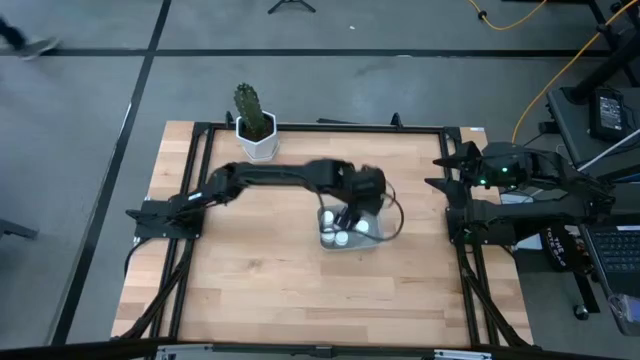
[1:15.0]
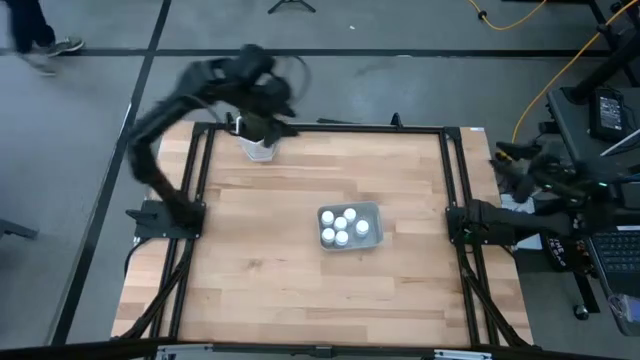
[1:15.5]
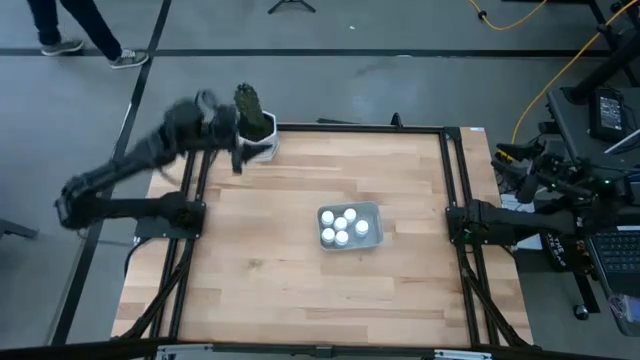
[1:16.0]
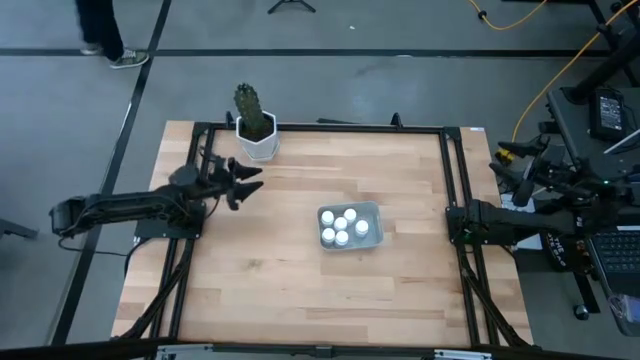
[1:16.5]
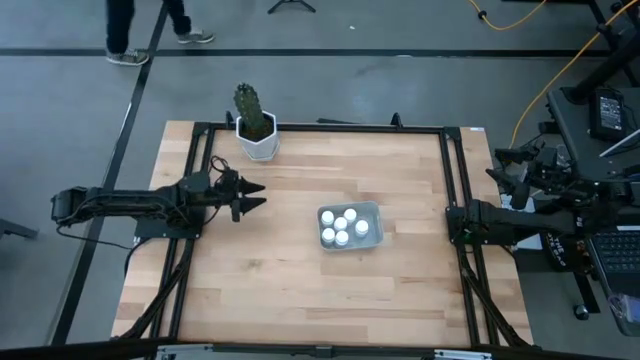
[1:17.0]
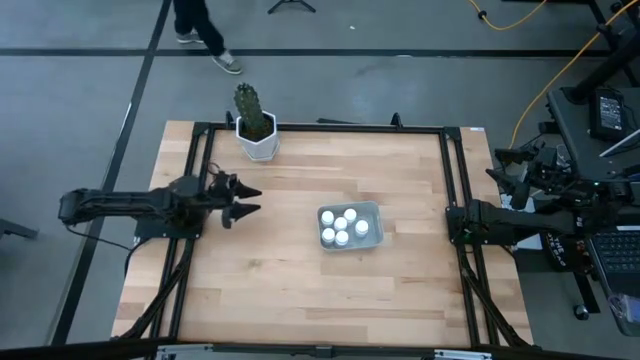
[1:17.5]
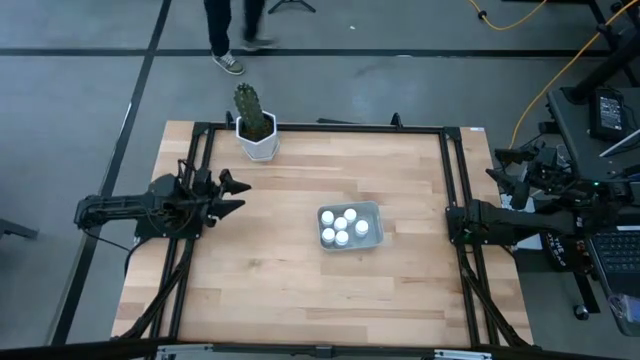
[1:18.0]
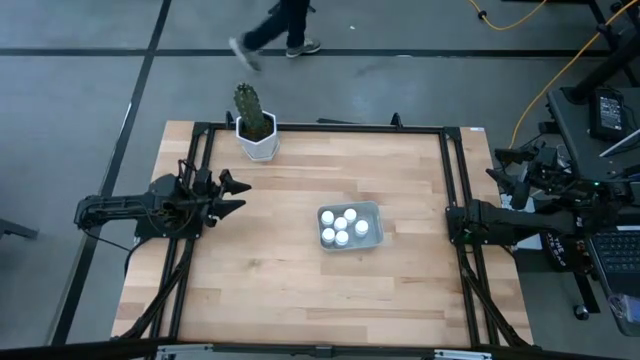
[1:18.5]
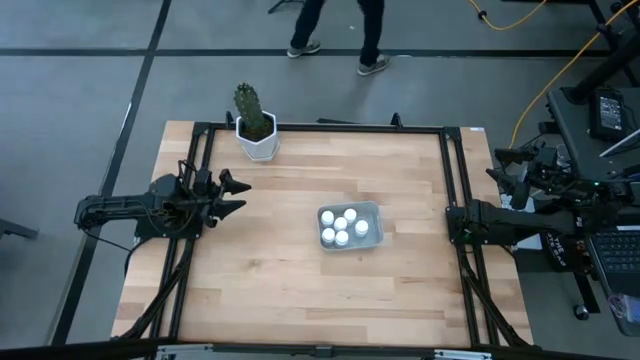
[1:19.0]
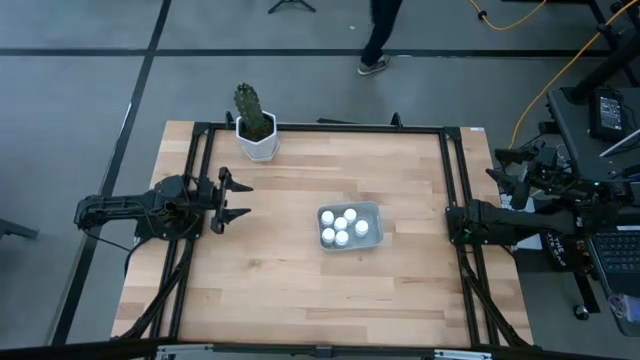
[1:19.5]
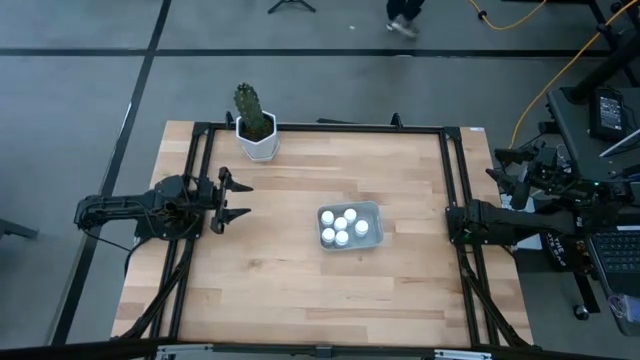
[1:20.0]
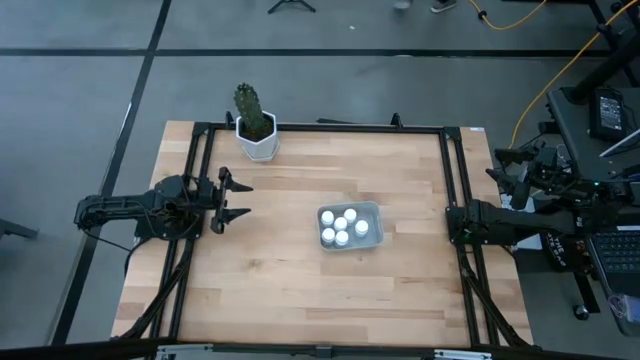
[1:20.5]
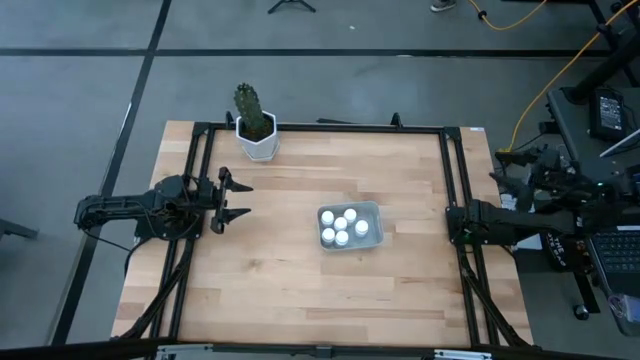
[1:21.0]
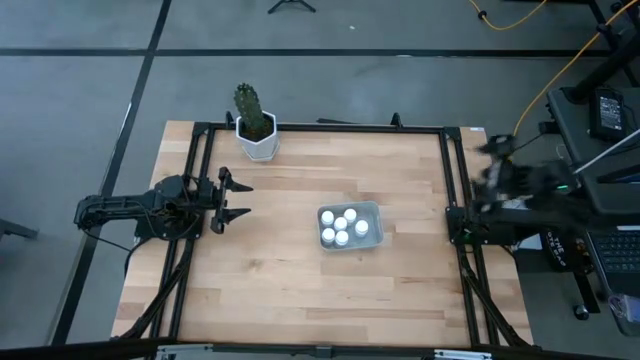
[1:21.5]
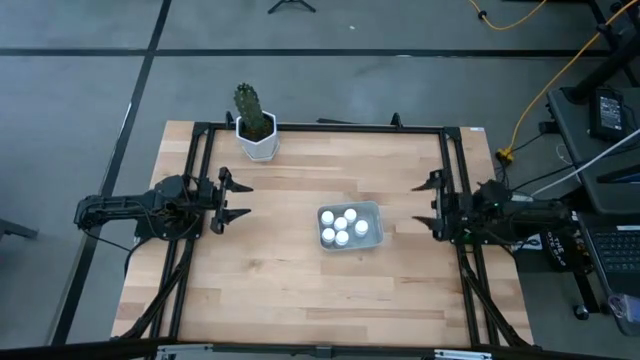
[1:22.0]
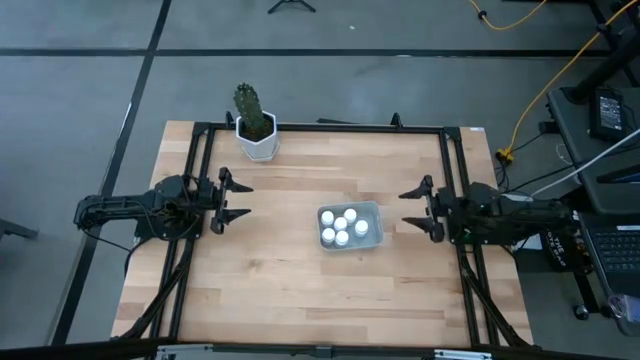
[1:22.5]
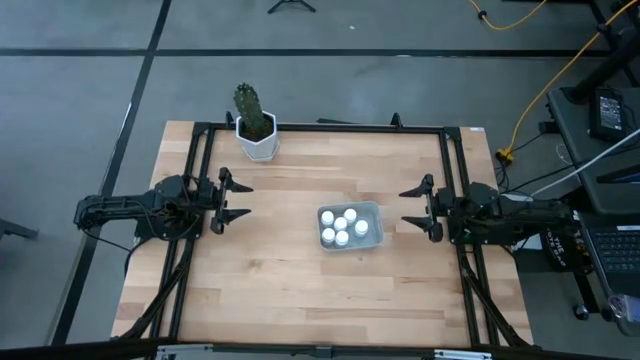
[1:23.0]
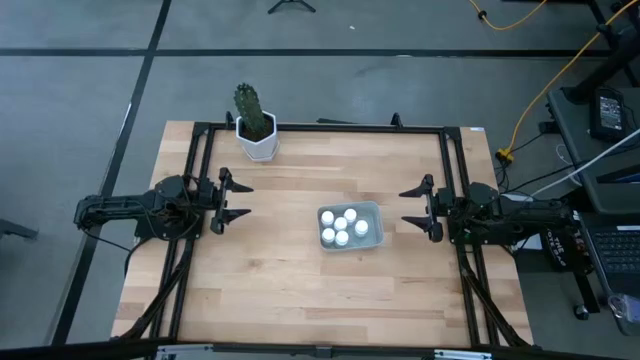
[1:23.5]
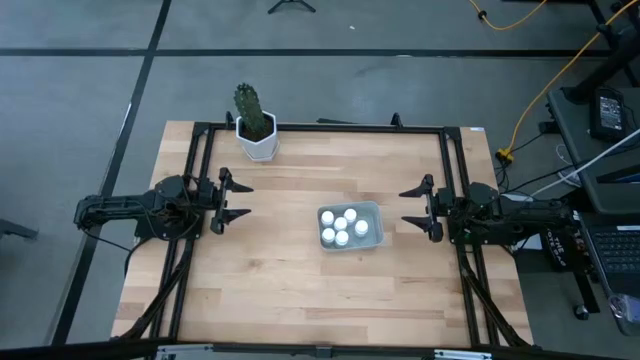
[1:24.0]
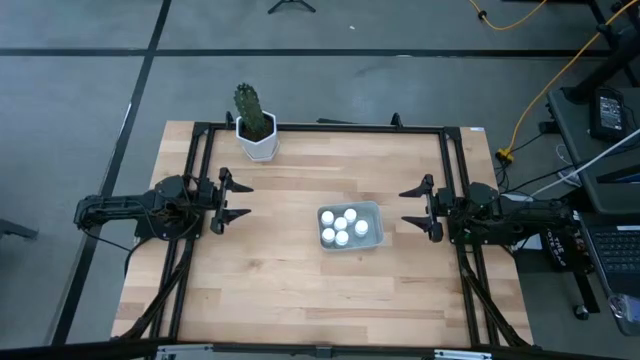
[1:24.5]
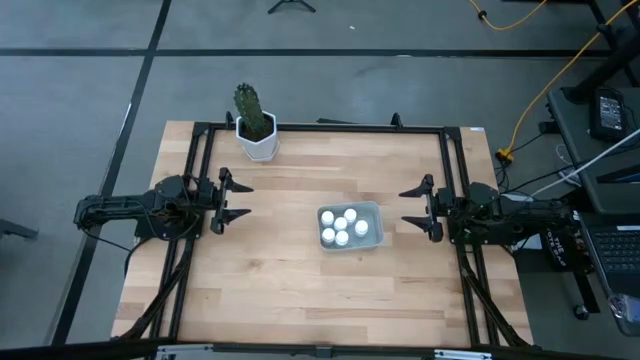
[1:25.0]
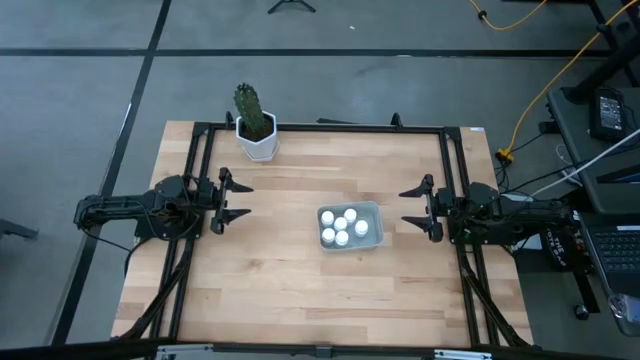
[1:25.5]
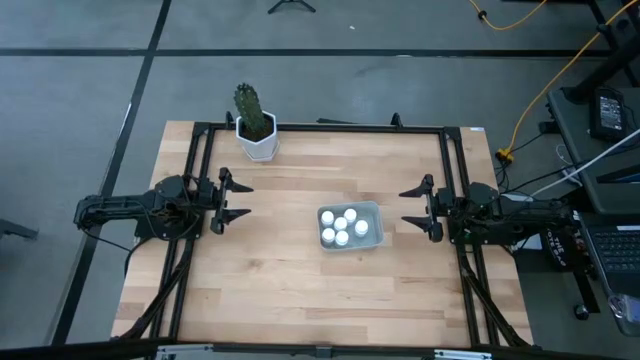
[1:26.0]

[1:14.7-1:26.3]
Task: Pick and place pill bottles into a basket
Return to Home Position

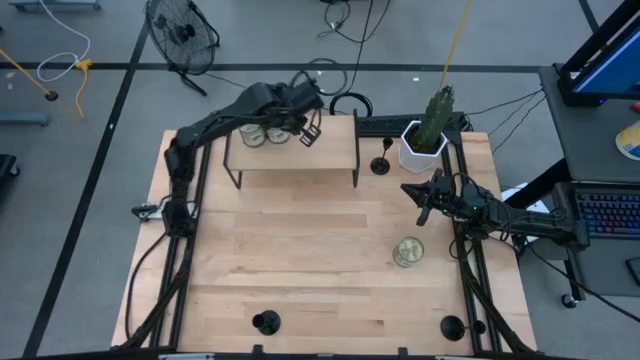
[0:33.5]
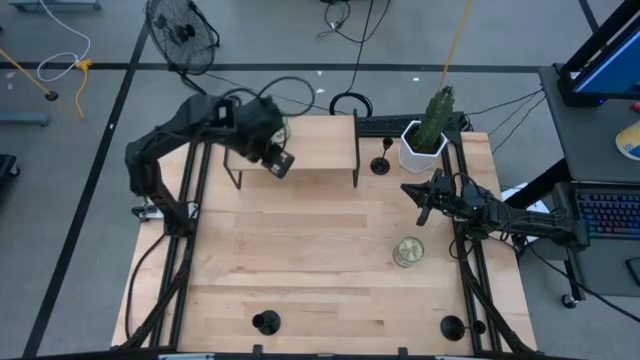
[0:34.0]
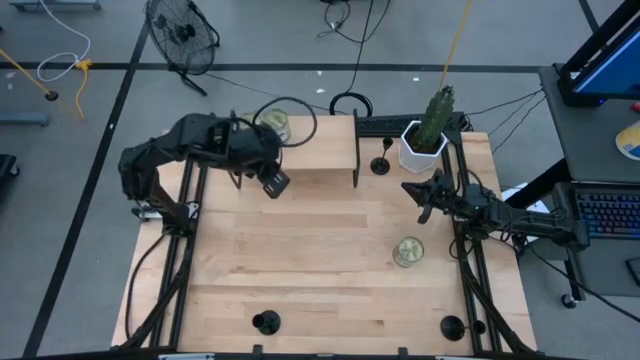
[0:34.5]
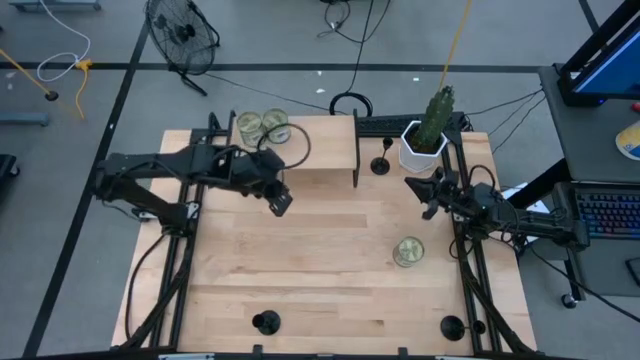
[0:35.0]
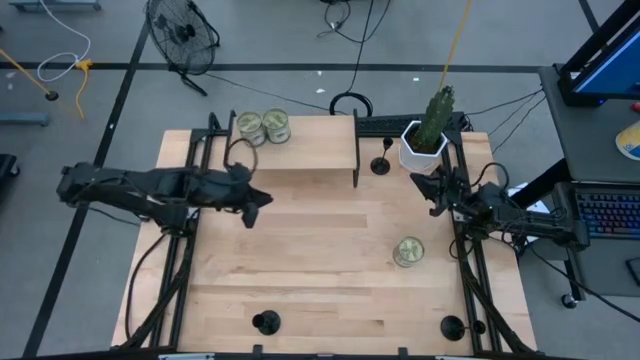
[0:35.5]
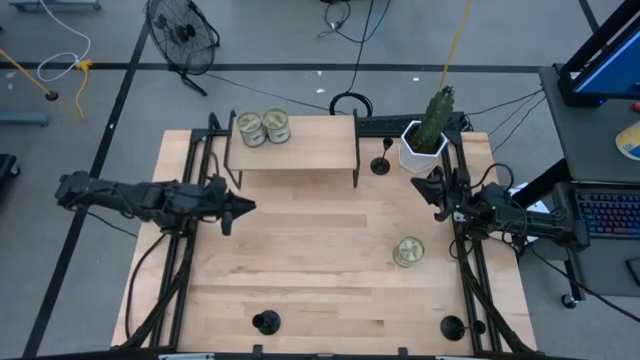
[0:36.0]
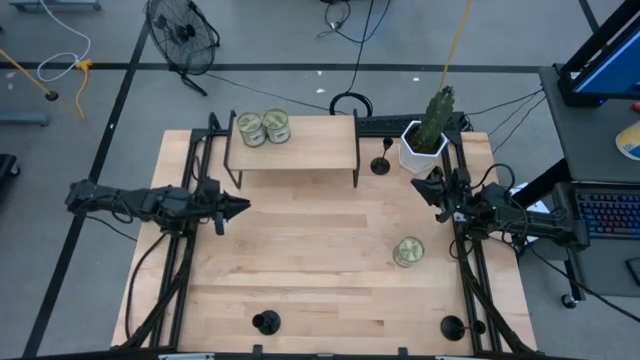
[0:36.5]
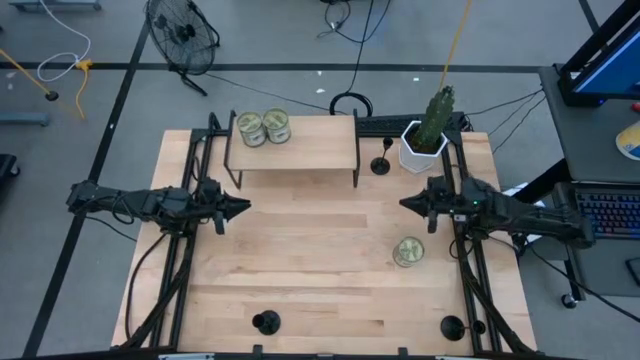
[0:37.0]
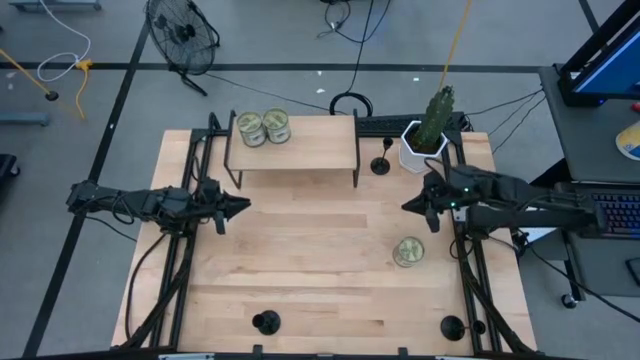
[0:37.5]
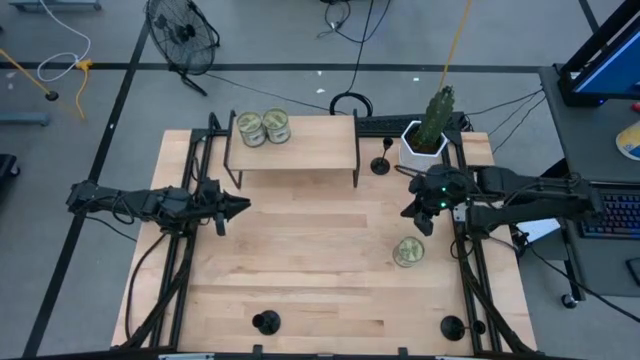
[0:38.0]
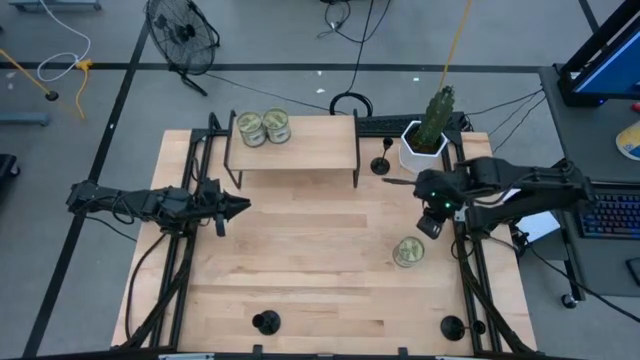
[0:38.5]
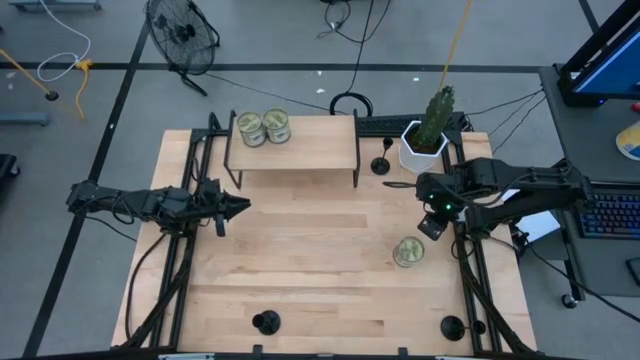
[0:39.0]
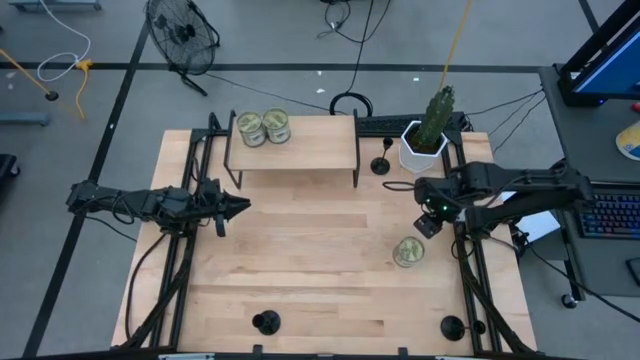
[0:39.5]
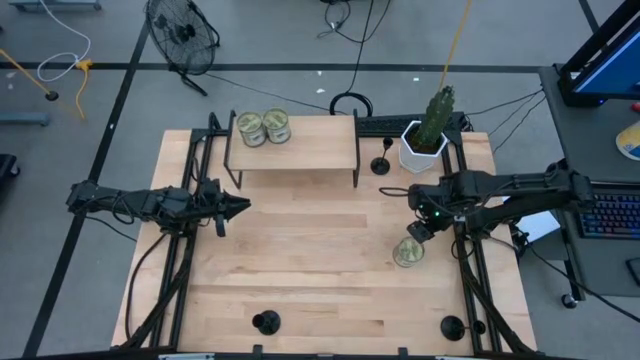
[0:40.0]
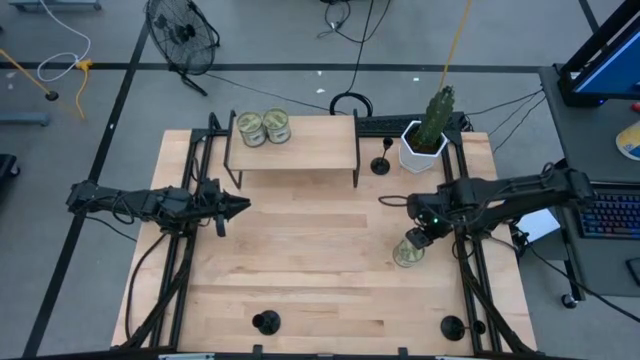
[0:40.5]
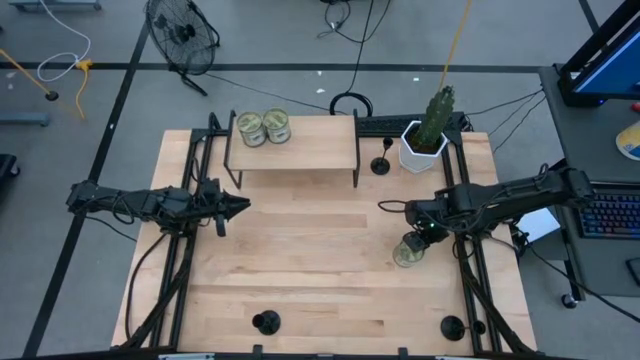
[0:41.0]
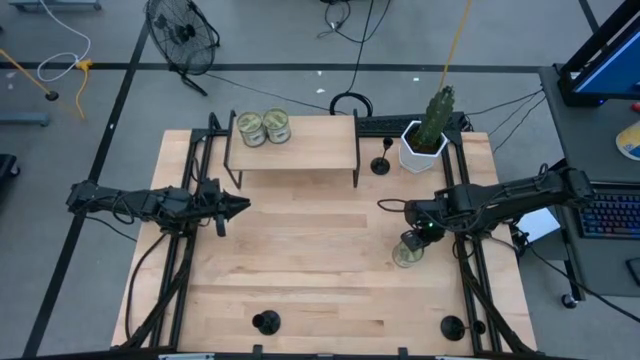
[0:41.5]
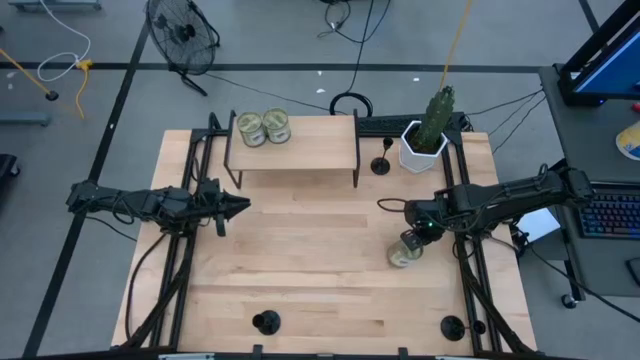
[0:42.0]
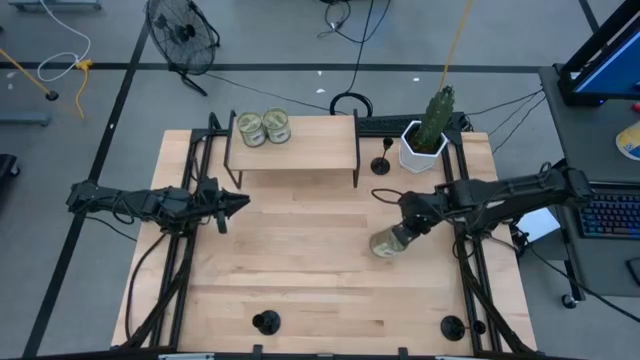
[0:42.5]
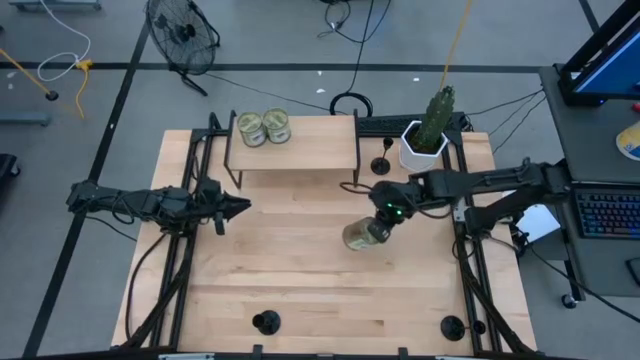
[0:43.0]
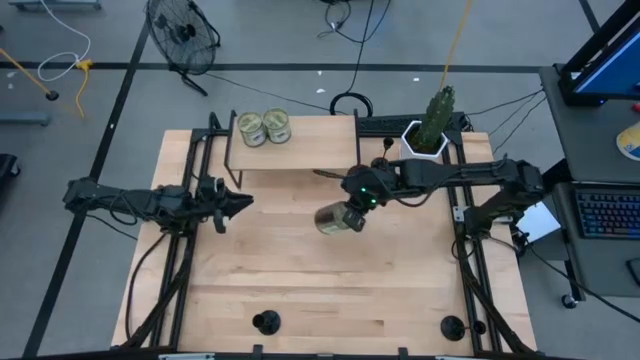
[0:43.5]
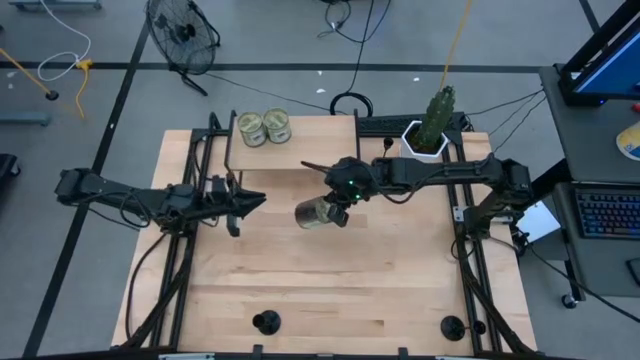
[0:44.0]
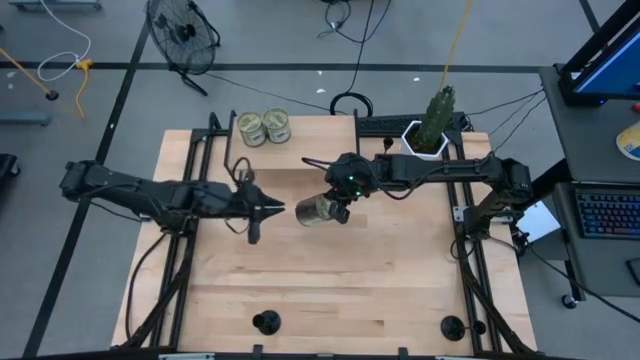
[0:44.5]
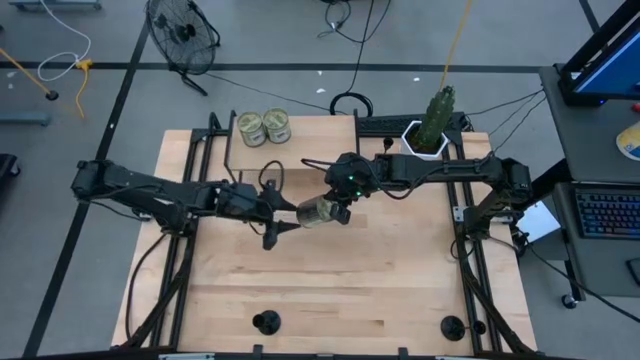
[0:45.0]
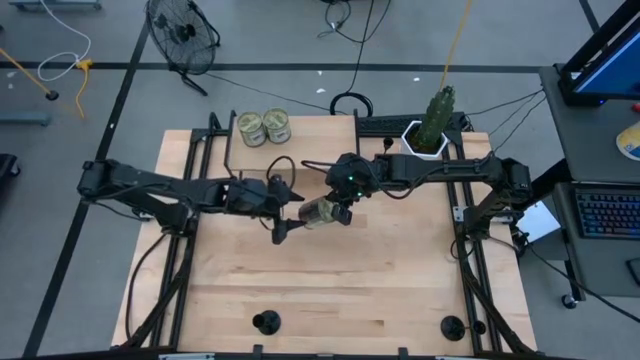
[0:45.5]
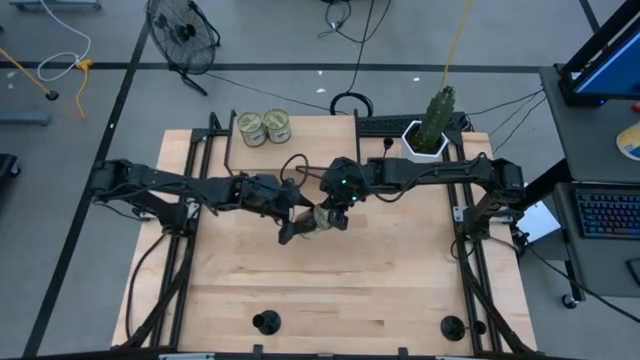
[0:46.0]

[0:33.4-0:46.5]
Task: Pick & Place candle stick holders
Put the green scented candle on the shelf
